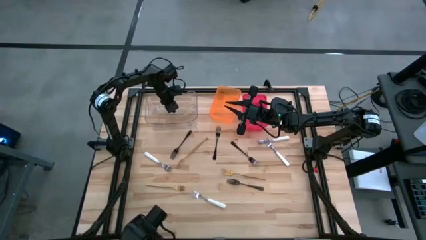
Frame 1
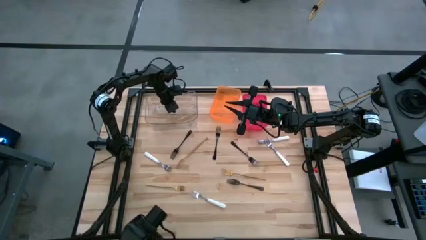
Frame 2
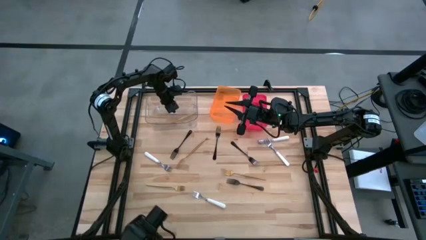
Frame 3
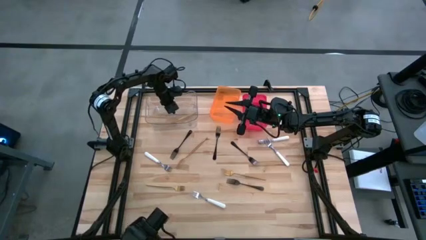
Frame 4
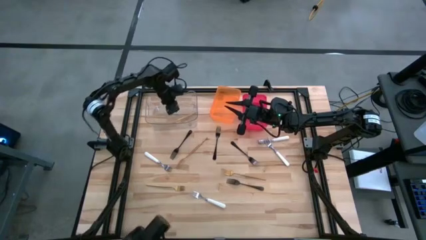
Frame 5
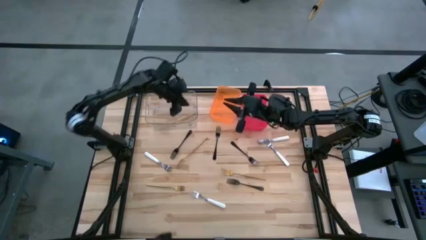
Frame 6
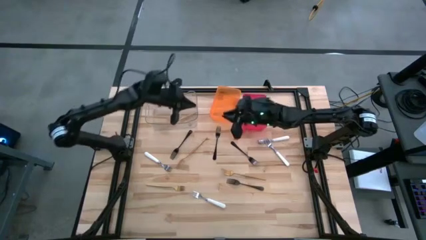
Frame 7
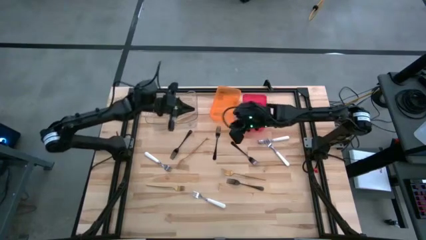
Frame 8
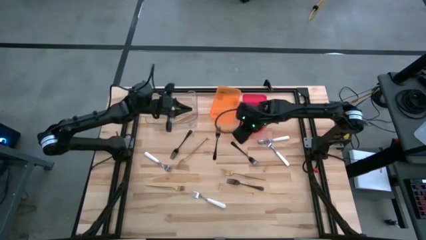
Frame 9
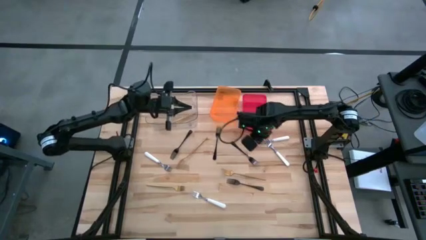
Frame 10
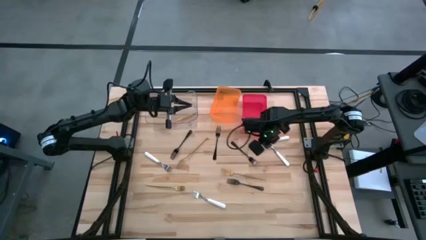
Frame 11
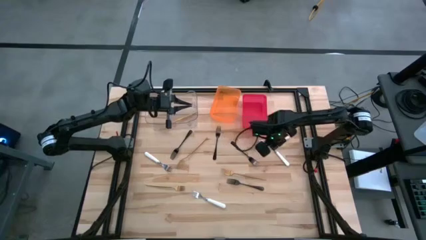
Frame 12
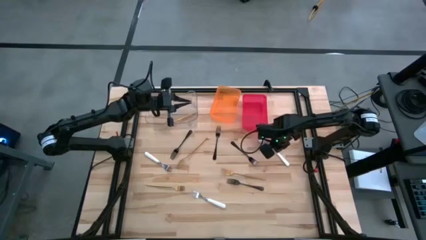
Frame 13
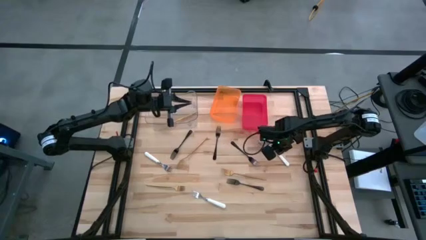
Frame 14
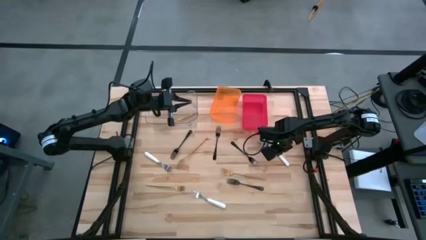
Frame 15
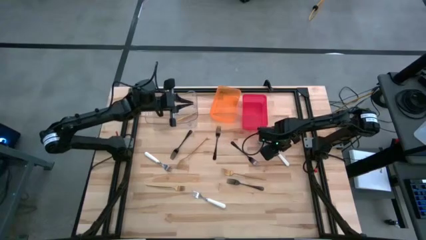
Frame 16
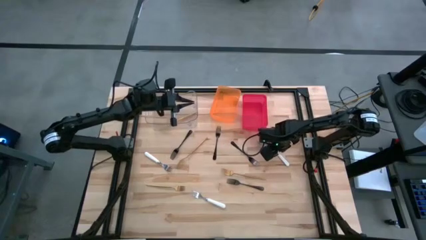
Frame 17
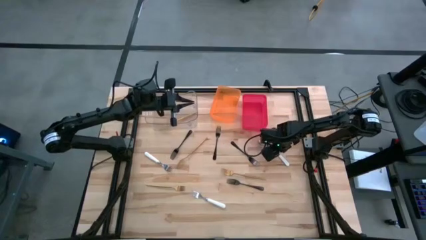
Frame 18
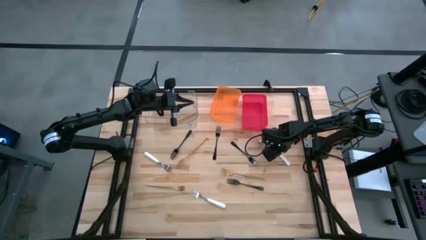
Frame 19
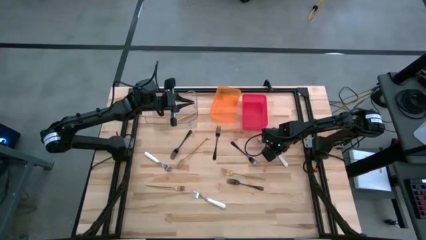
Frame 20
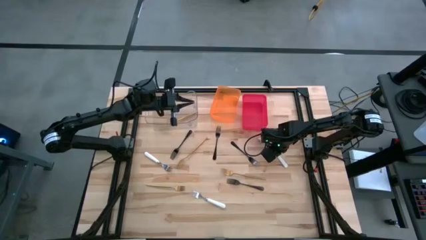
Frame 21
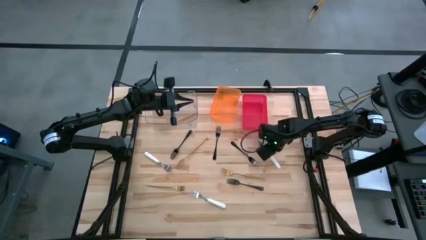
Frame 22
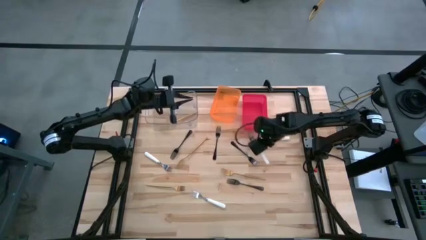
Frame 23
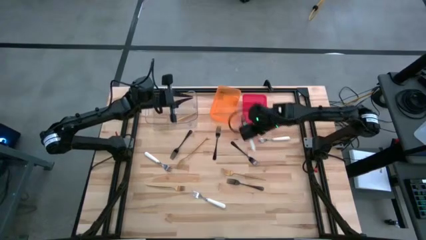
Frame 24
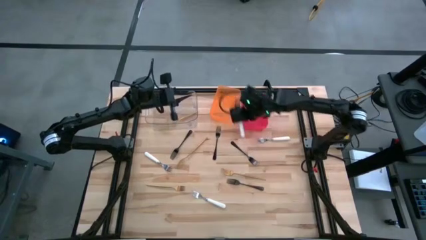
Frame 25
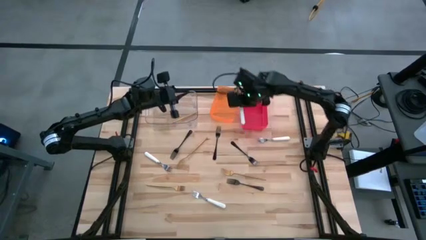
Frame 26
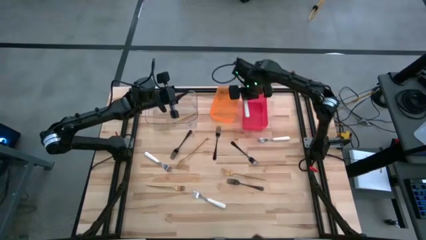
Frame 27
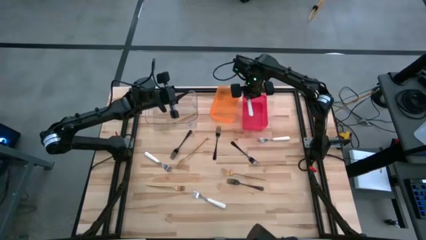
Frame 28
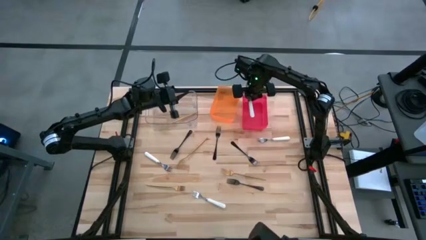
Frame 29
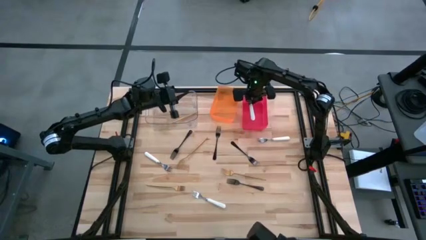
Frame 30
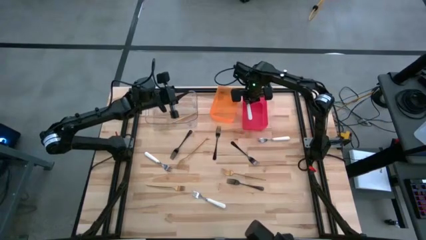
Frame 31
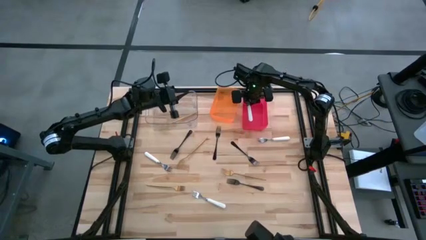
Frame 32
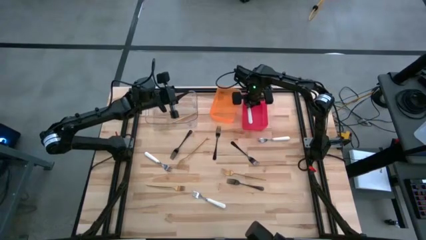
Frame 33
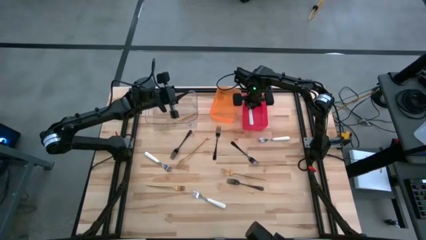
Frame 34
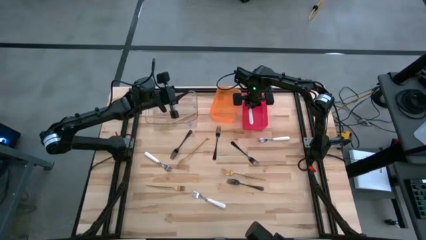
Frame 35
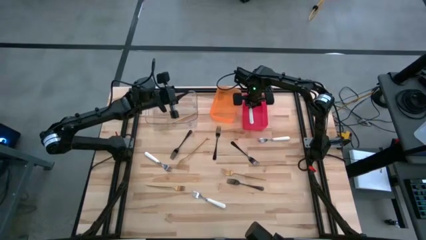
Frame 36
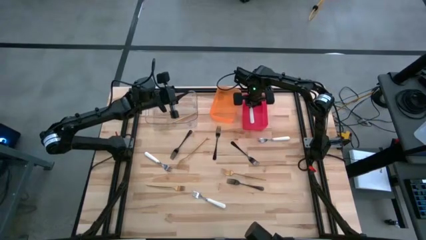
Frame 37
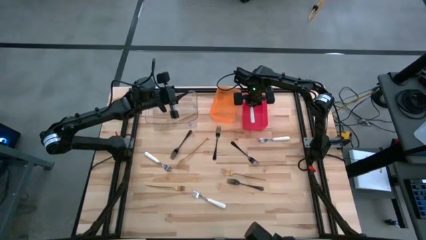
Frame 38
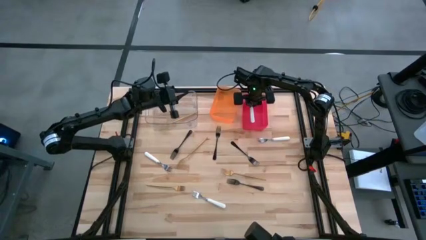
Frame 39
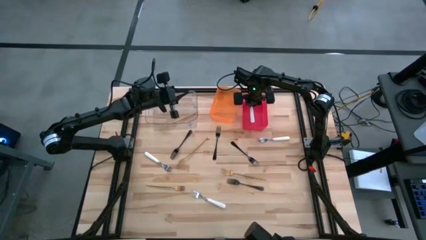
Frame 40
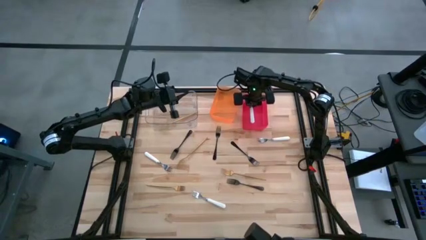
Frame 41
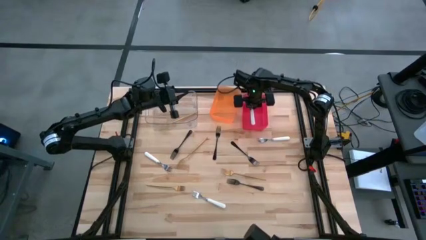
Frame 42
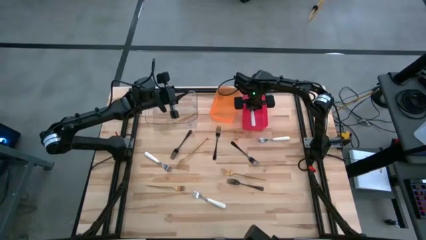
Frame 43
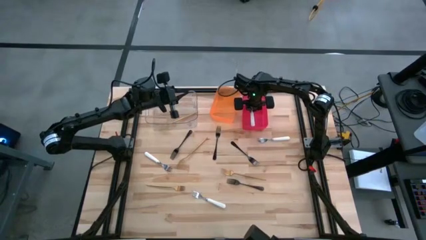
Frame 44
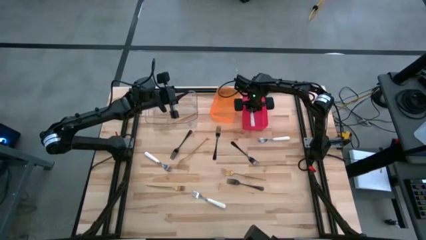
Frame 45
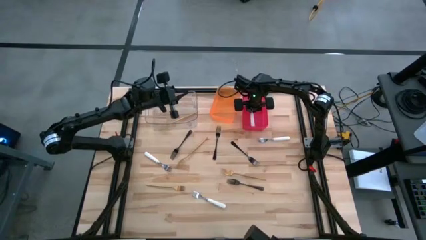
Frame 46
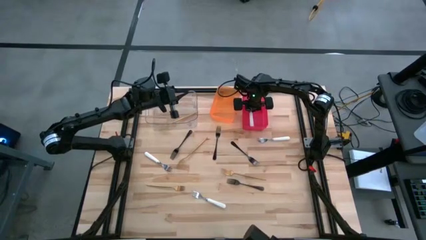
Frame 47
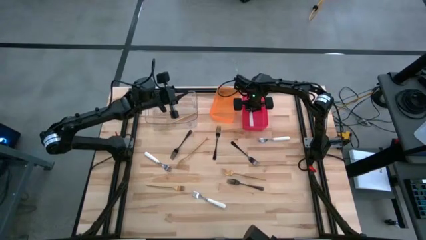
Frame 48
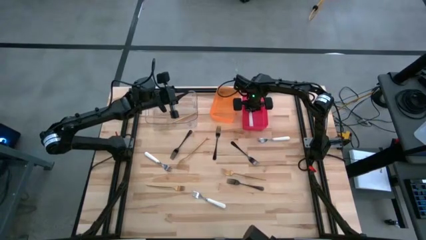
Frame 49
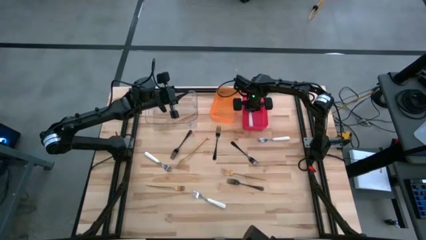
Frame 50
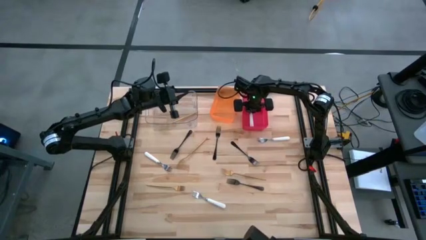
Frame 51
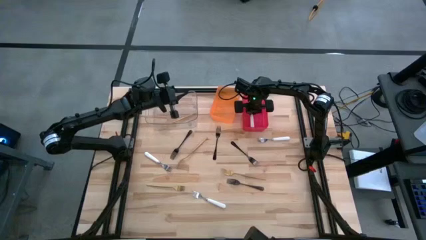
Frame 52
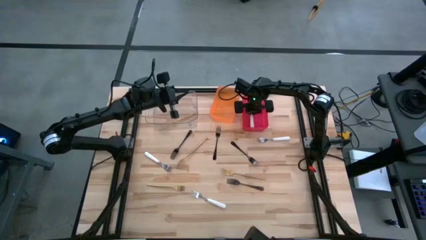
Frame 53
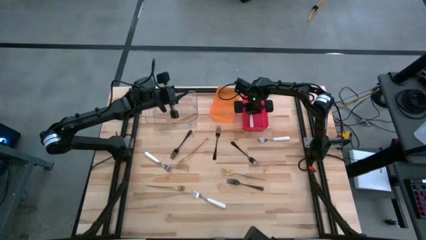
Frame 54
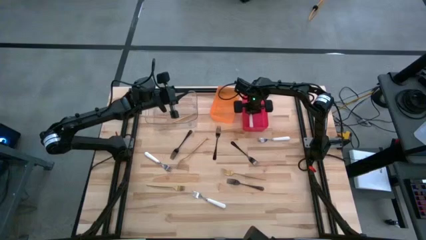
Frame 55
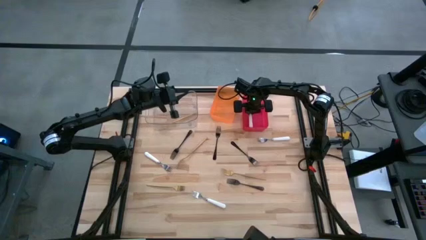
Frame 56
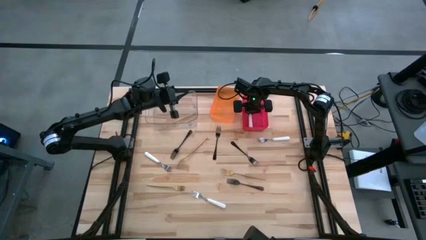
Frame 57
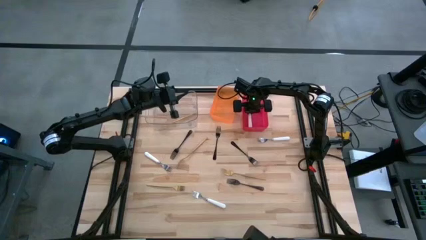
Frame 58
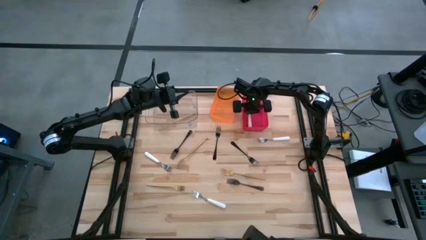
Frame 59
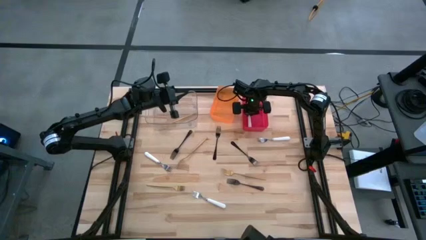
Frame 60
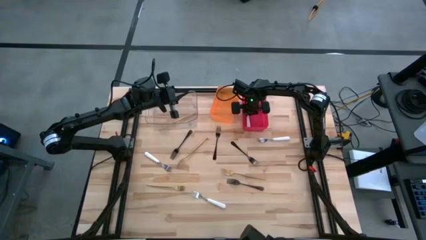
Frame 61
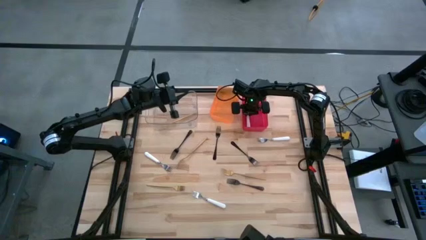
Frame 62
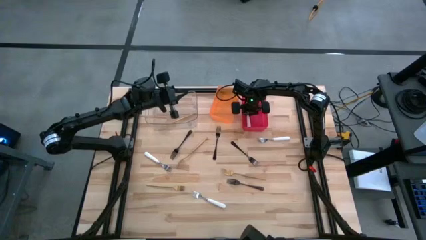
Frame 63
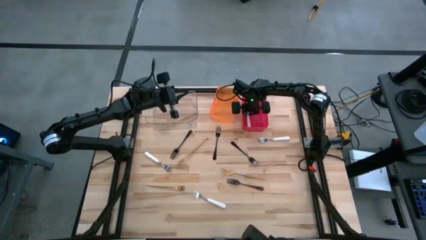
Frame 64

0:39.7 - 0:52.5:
Task: Sort silverware by color (type)
Put the white fork into the red bin
